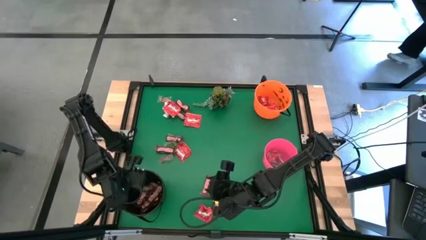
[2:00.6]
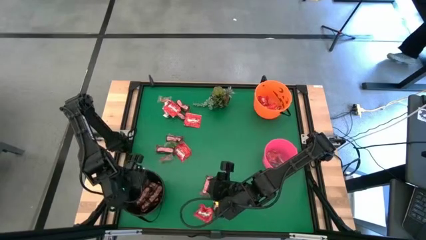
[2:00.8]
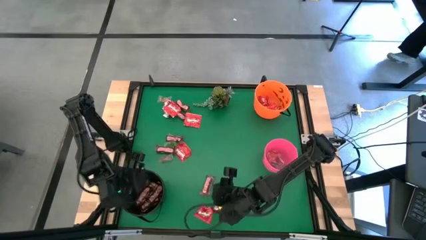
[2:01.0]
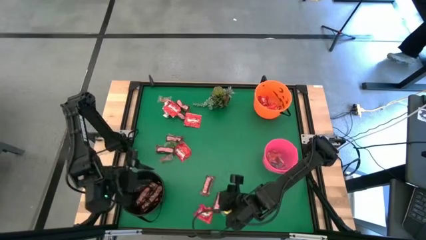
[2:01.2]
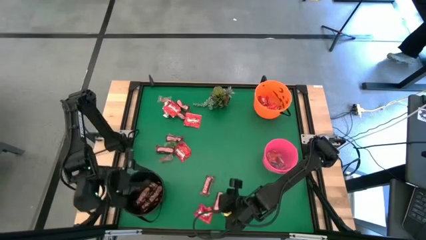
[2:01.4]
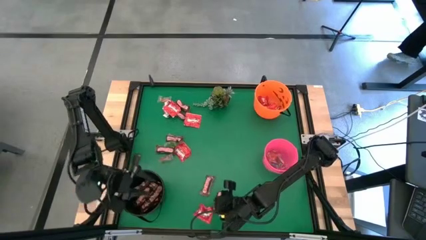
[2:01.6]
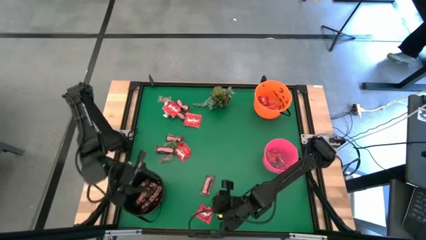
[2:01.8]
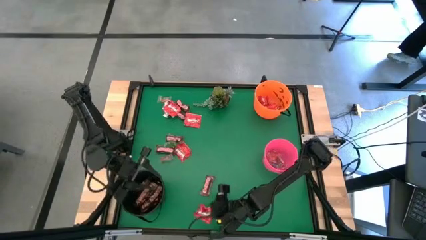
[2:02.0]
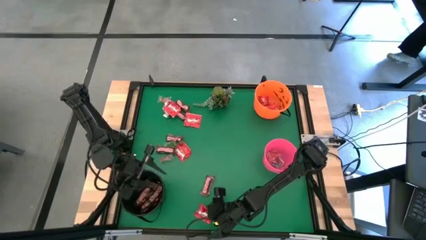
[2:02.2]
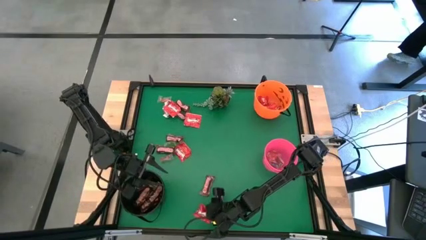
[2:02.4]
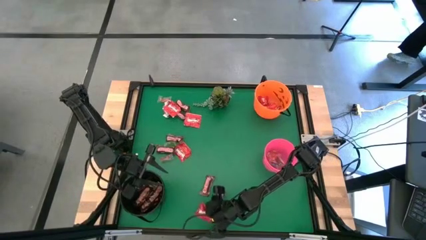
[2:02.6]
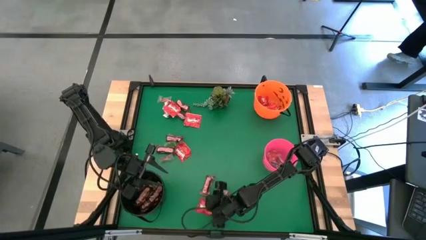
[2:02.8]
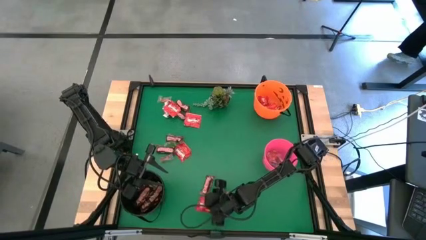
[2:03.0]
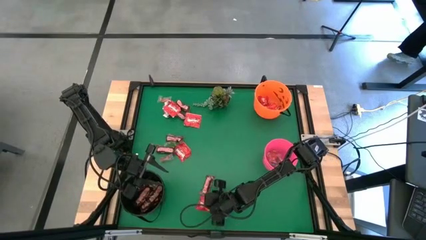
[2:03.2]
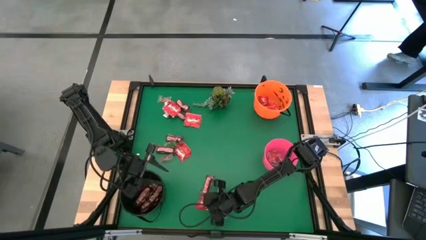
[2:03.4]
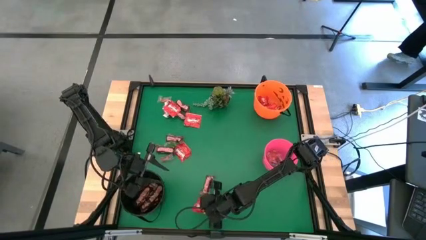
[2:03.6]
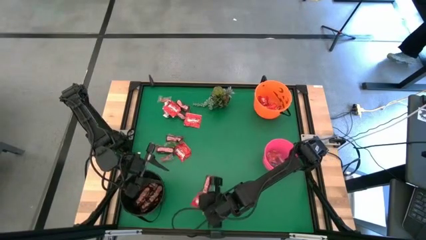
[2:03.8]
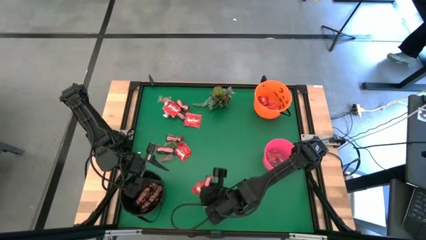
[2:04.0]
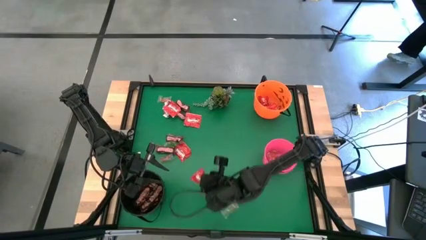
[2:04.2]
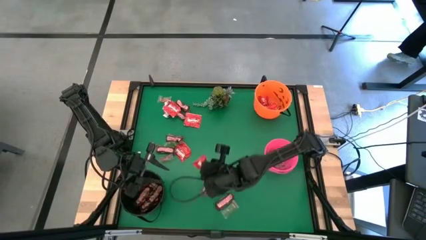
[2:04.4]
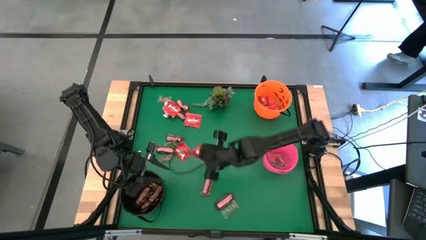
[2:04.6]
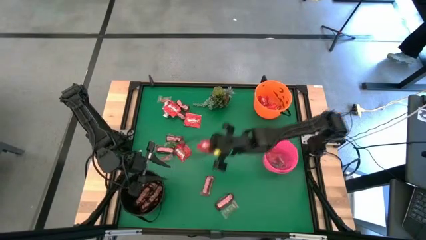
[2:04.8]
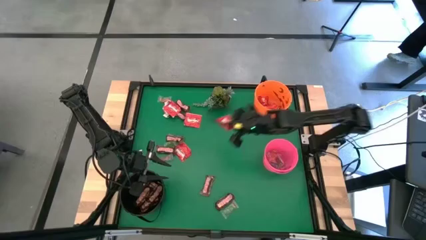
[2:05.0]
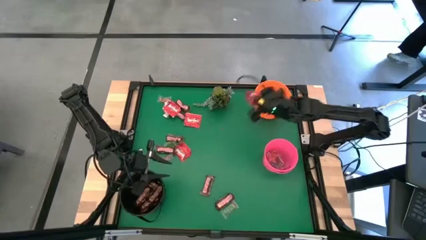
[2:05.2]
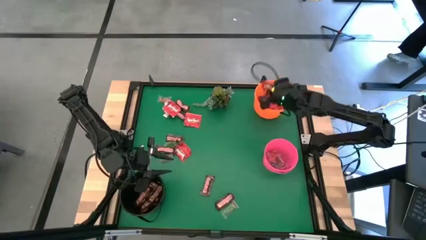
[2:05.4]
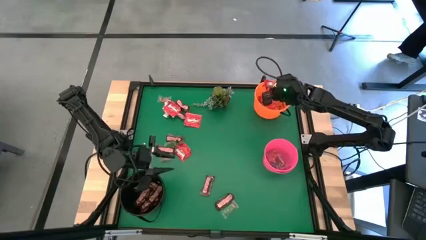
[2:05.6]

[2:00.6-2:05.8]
Task: Sort candy
Put the red candy into the orange bucket

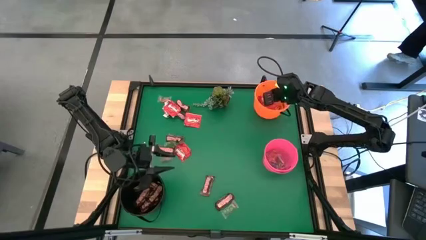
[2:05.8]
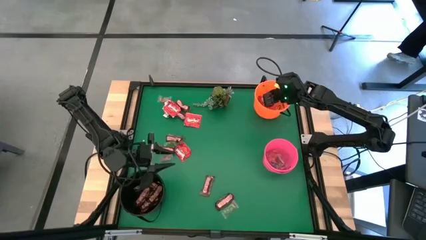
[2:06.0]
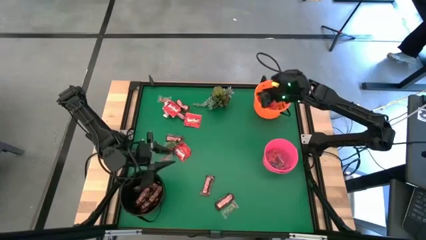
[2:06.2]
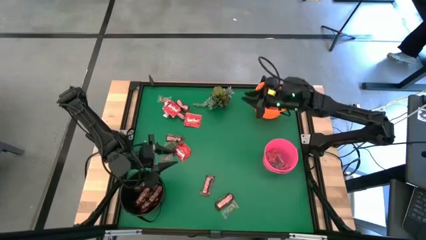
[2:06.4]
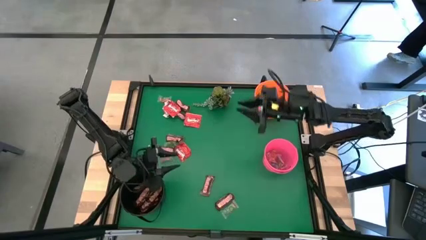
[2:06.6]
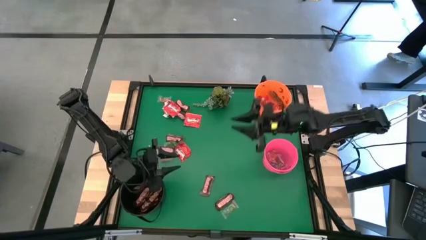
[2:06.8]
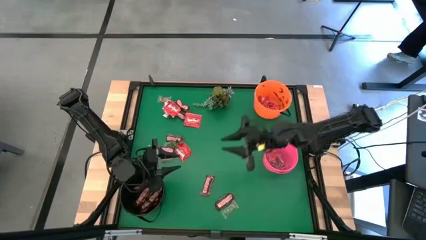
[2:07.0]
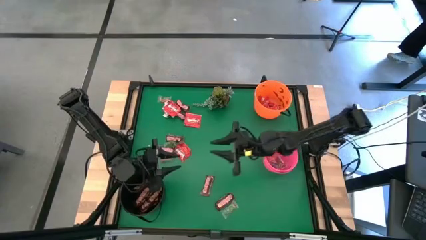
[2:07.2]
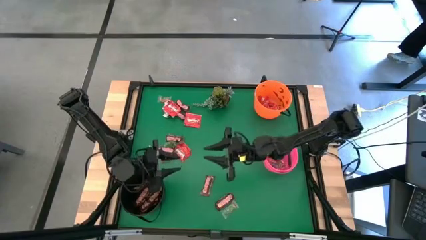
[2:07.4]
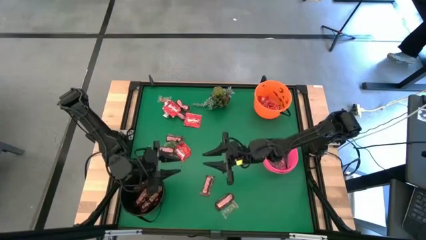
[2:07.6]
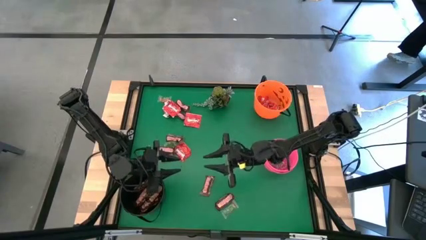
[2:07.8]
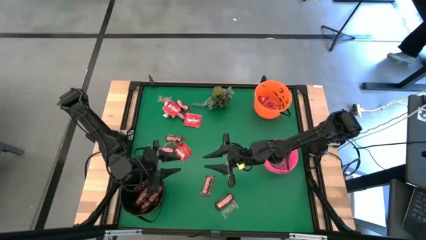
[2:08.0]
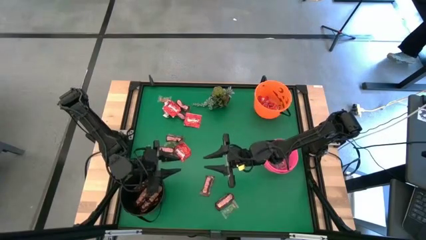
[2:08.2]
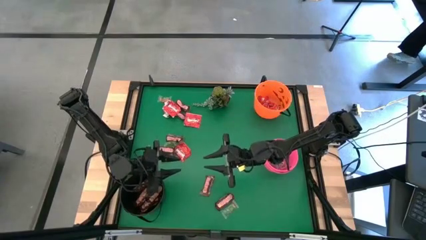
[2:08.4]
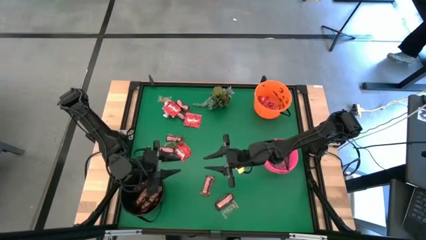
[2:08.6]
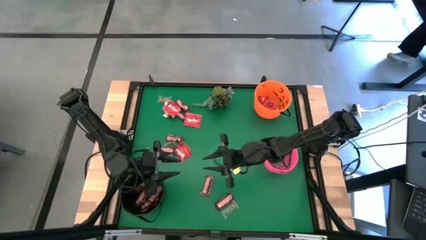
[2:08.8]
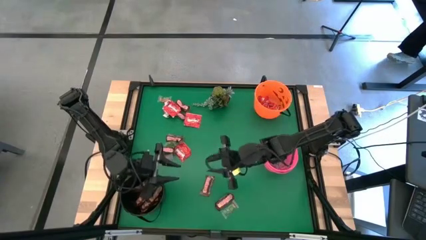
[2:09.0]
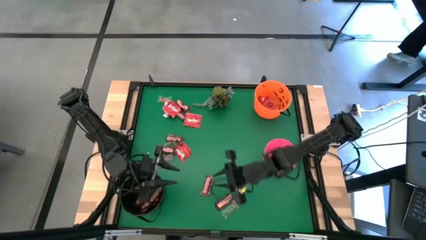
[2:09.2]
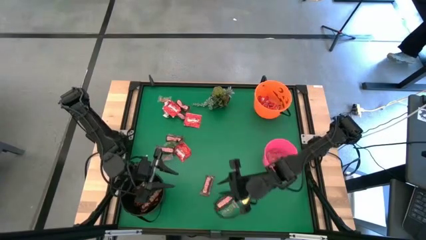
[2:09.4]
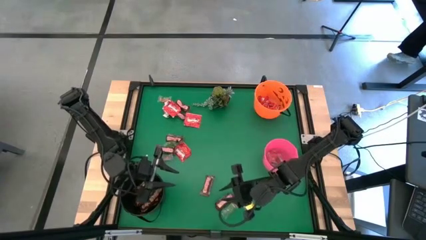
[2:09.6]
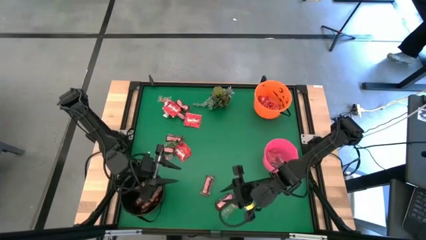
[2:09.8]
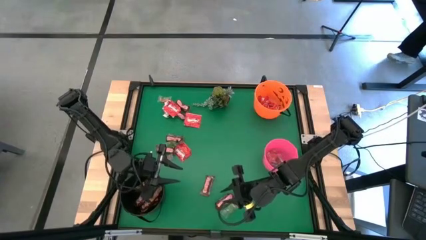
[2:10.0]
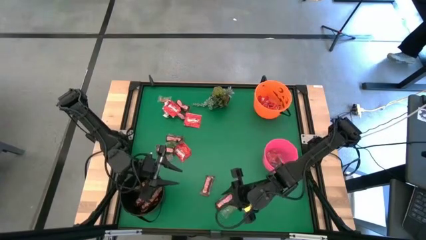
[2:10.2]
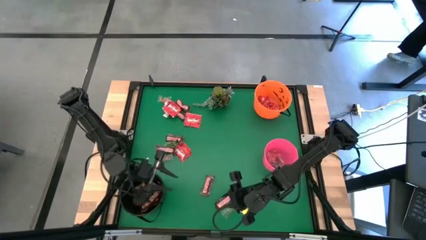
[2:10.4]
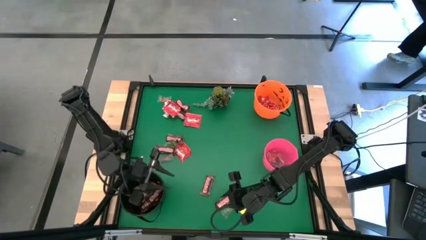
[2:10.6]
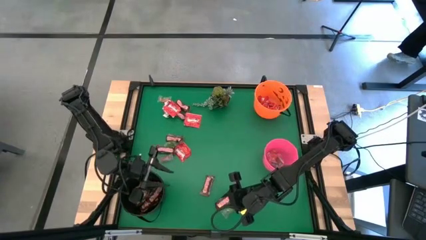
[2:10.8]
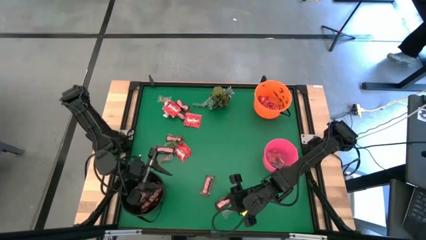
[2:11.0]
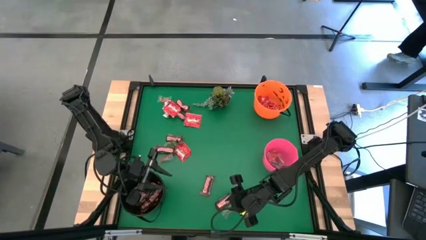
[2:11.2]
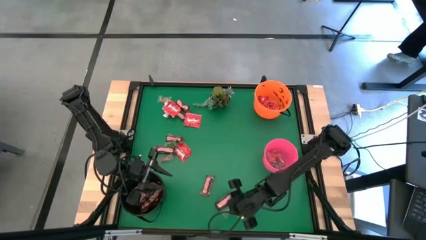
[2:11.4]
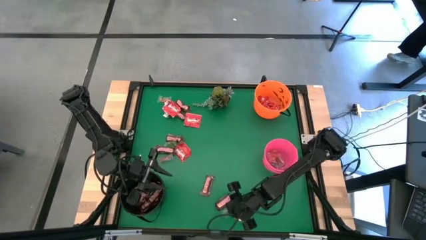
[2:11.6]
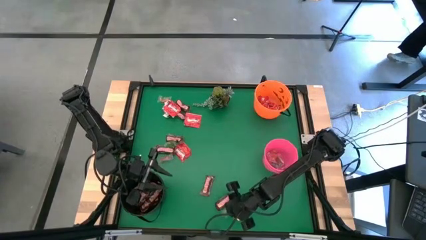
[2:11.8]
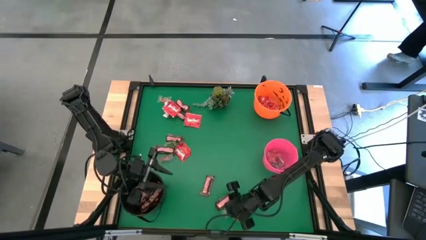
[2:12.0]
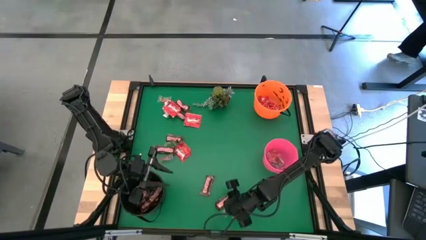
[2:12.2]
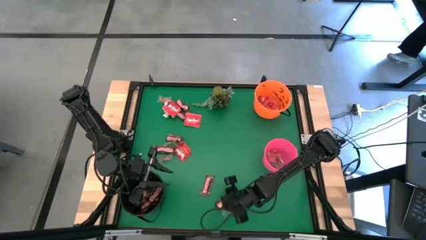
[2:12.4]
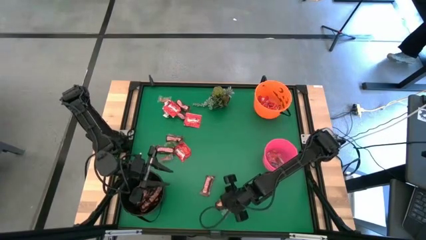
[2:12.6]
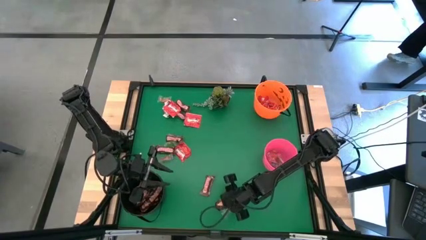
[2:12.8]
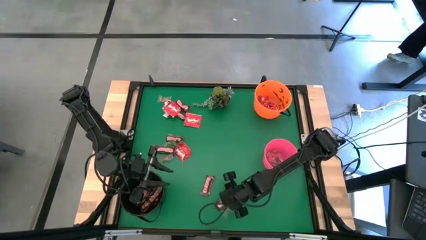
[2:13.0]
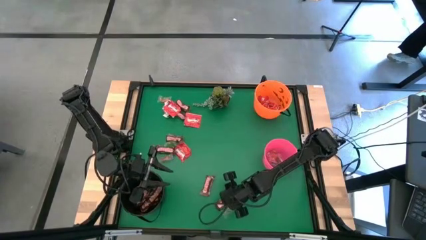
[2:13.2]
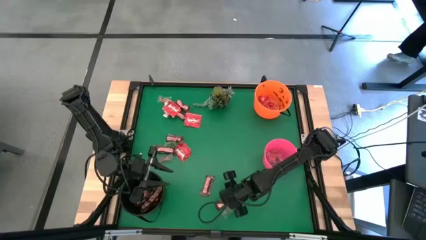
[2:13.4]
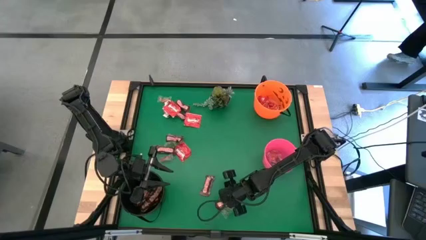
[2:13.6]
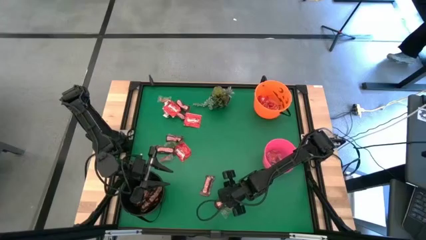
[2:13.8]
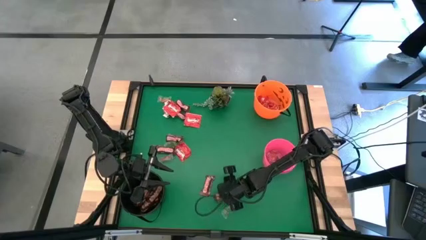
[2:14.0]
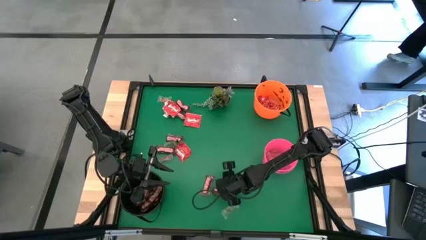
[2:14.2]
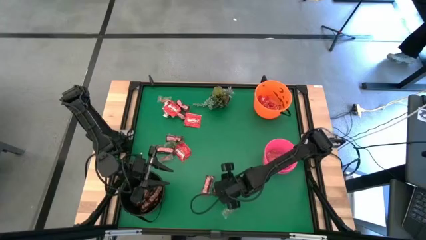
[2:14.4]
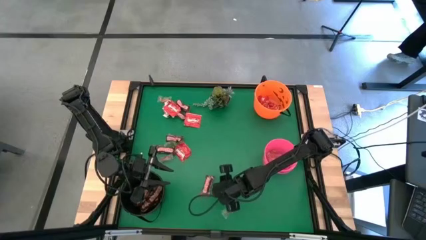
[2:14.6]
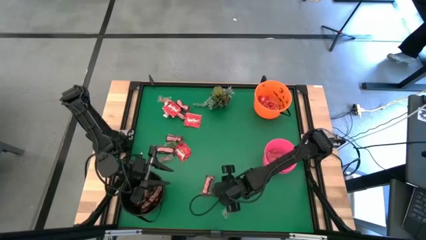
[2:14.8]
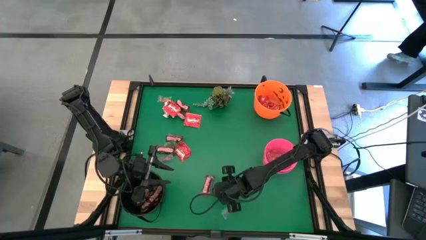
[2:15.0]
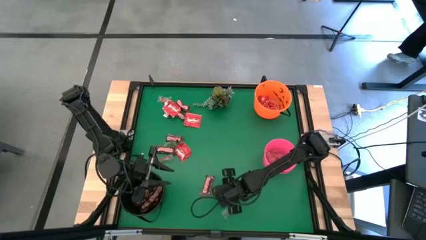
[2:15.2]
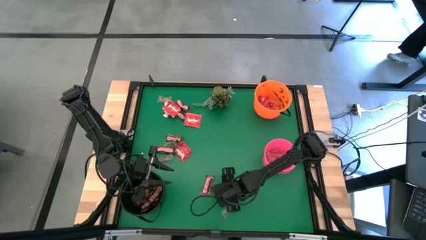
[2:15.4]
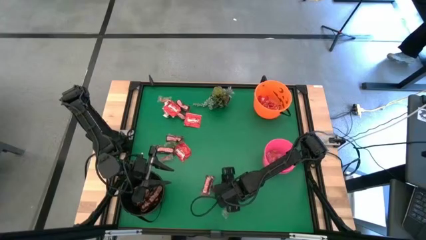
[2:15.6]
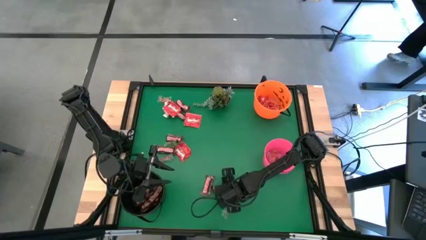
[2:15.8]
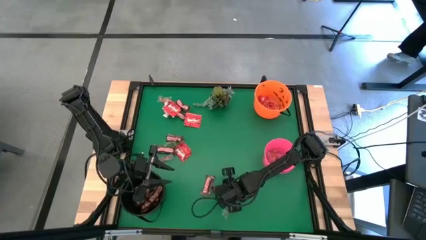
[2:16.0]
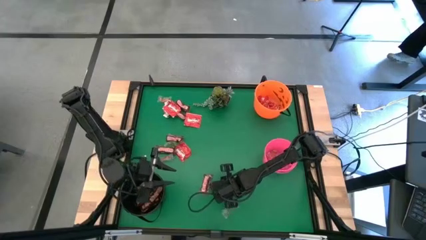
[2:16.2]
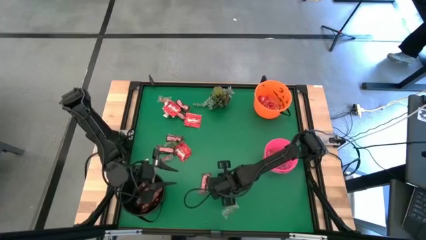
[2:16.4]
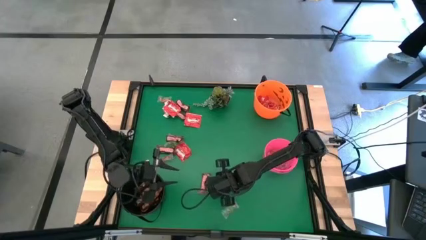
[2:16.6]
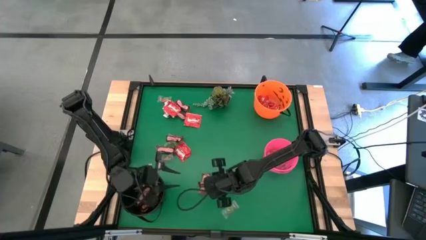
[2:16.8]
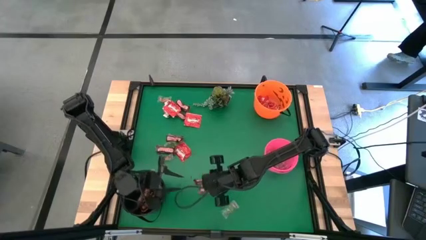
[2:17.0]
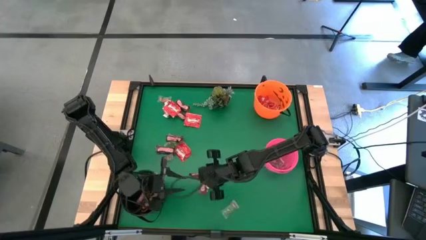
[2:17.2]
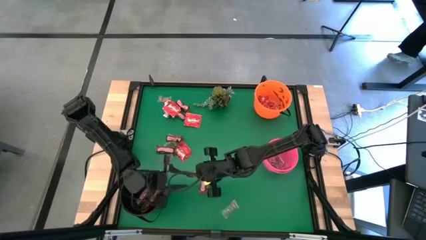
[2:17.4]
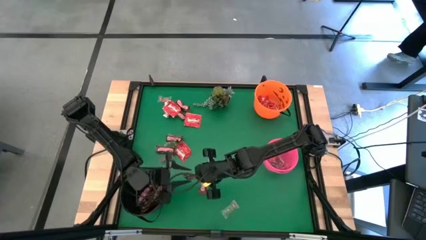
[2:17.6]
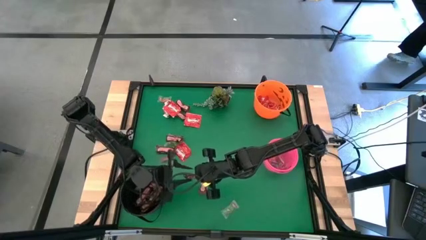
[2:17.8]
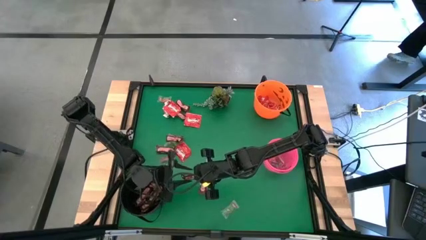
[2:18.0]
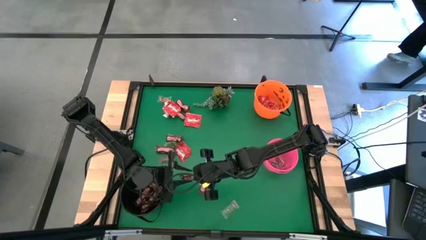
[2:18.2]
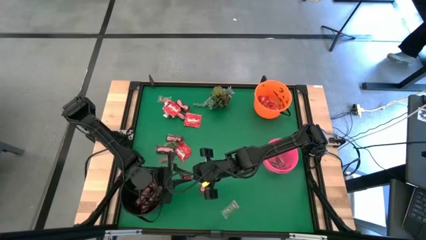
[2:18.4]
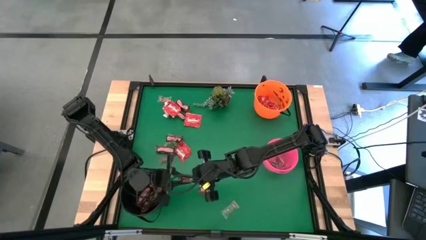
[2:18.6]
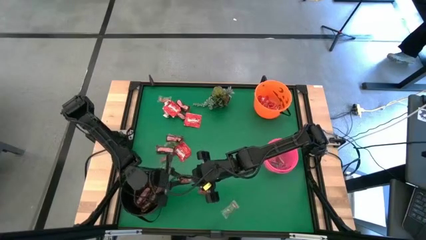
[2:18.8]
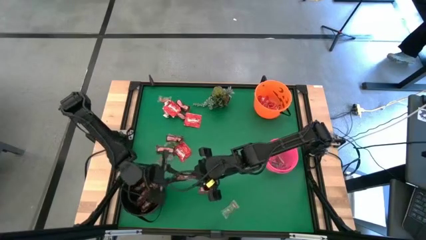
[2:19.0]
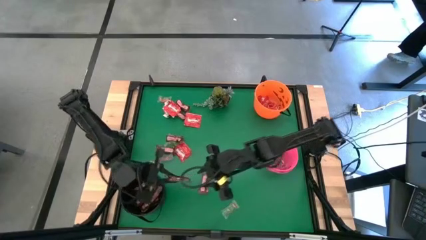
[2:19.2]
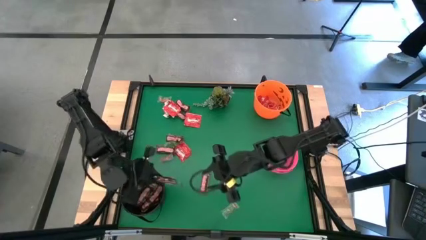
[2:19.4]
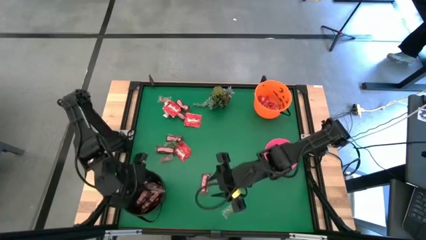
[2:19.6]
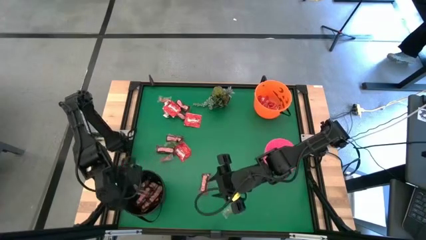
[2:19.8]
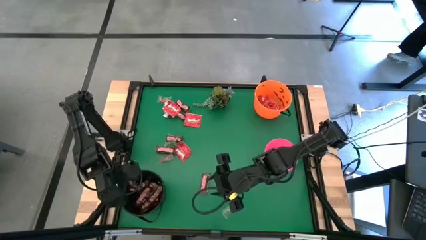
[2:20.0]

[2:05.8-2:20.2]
Put the brown chocolate bar into the black bucket
